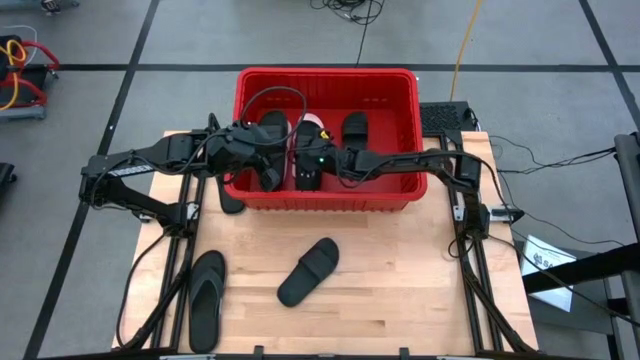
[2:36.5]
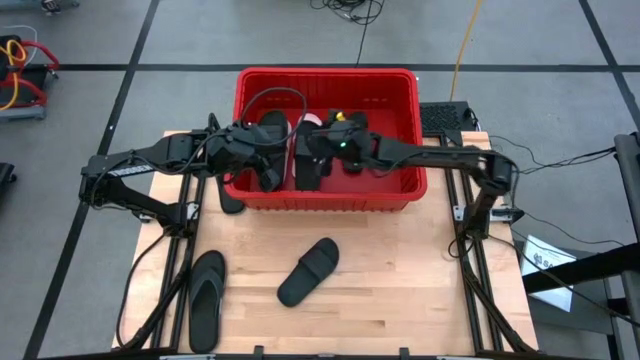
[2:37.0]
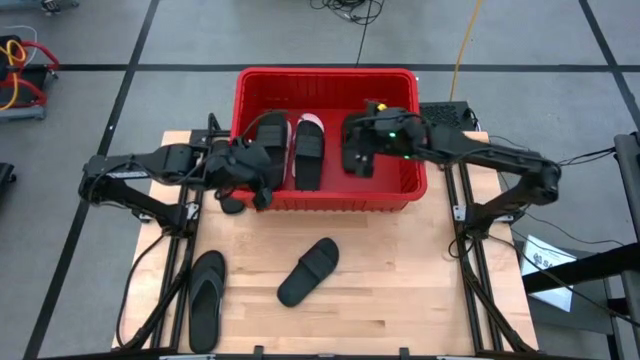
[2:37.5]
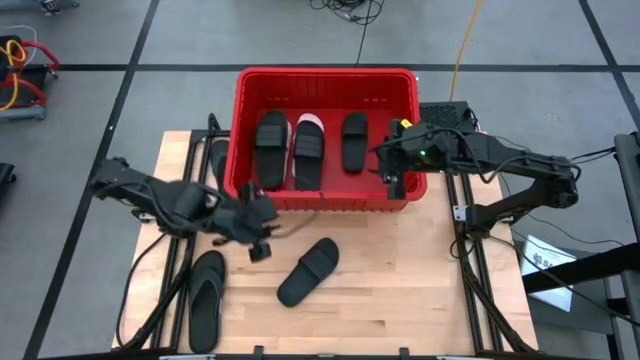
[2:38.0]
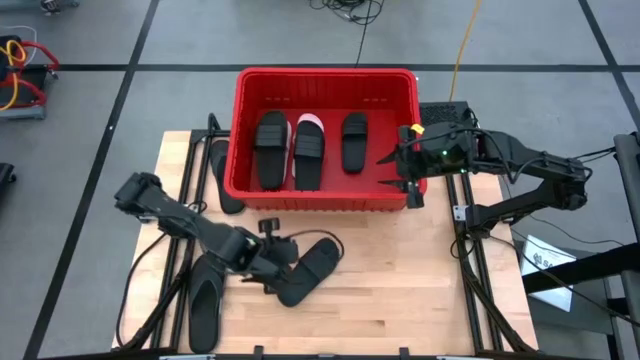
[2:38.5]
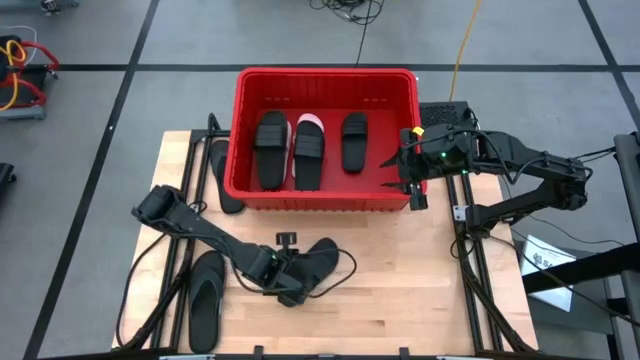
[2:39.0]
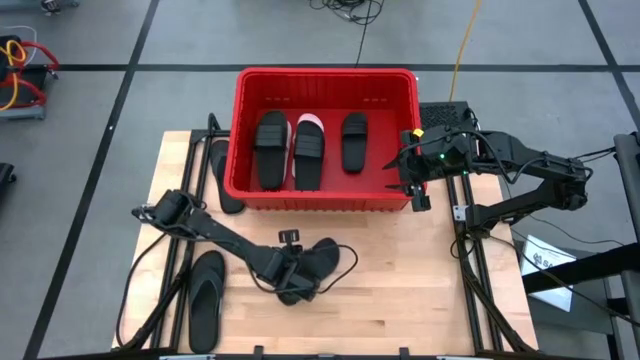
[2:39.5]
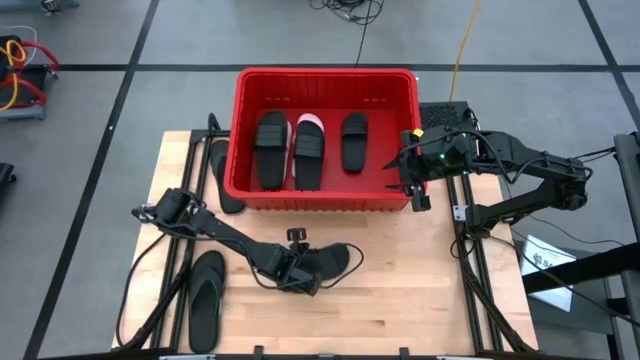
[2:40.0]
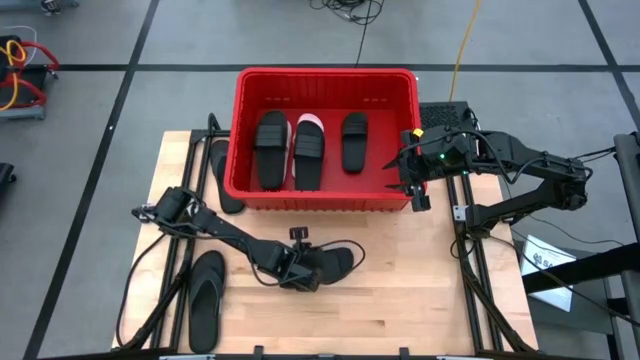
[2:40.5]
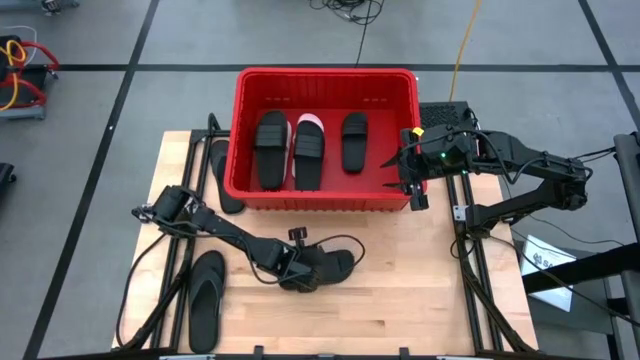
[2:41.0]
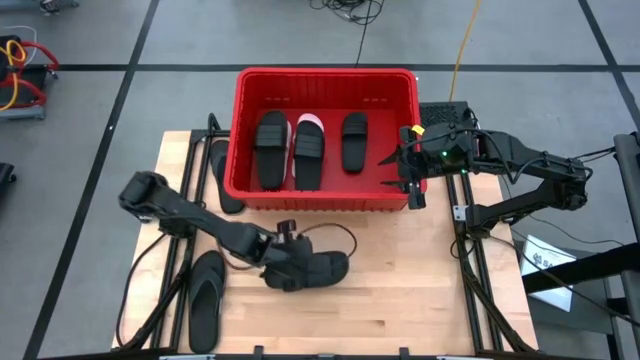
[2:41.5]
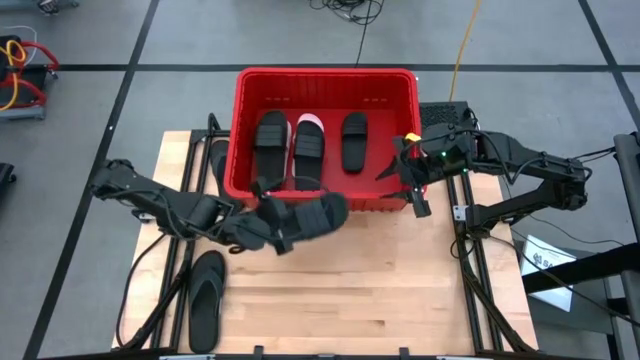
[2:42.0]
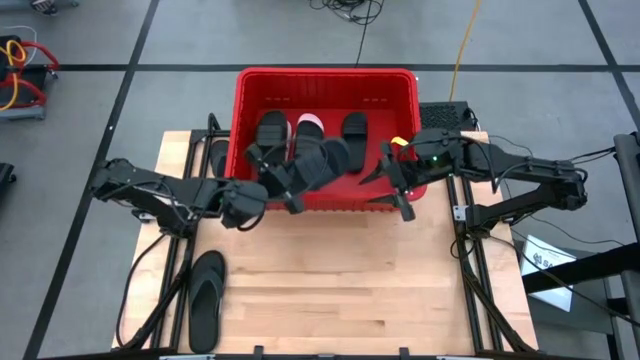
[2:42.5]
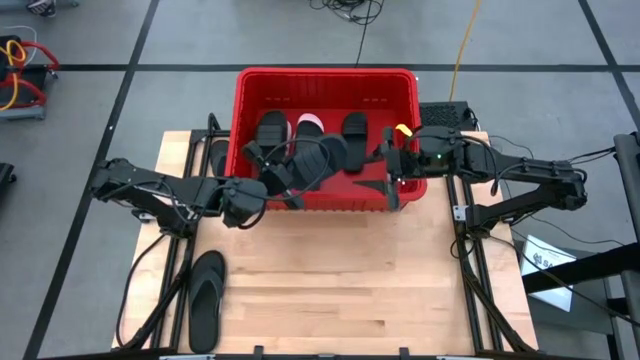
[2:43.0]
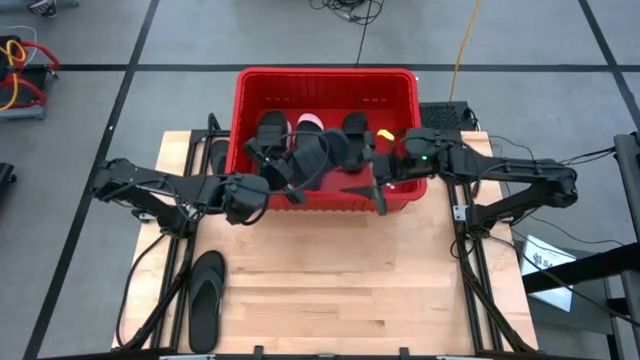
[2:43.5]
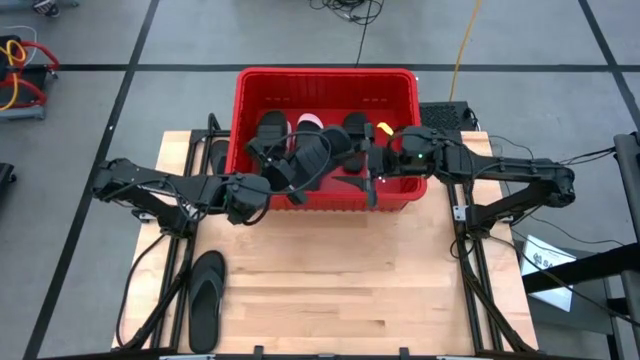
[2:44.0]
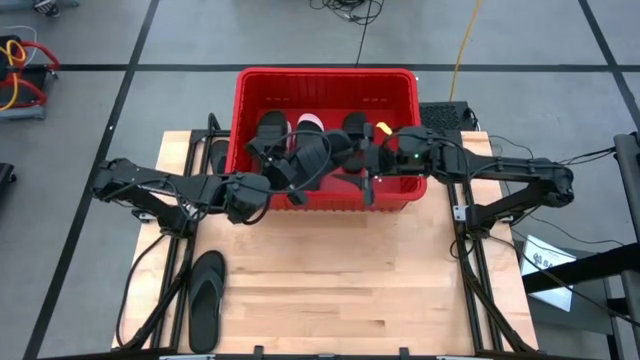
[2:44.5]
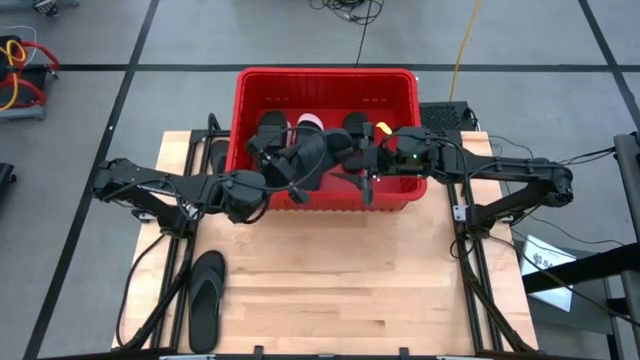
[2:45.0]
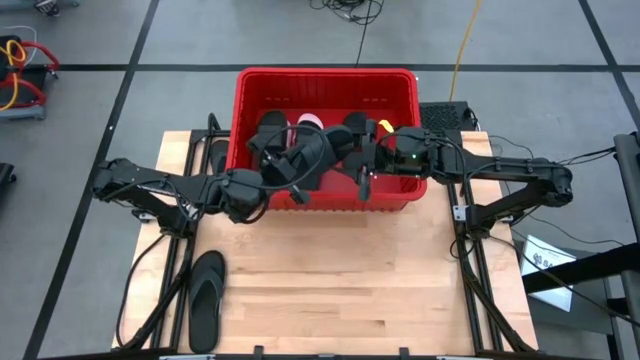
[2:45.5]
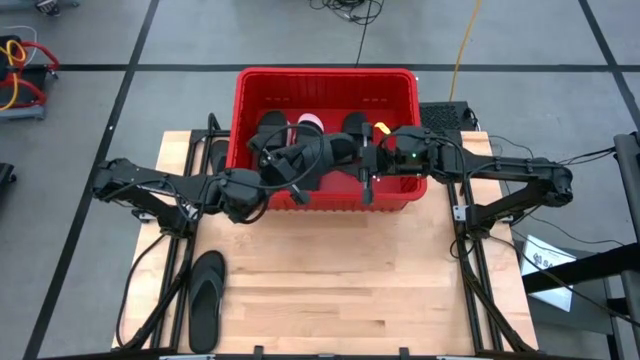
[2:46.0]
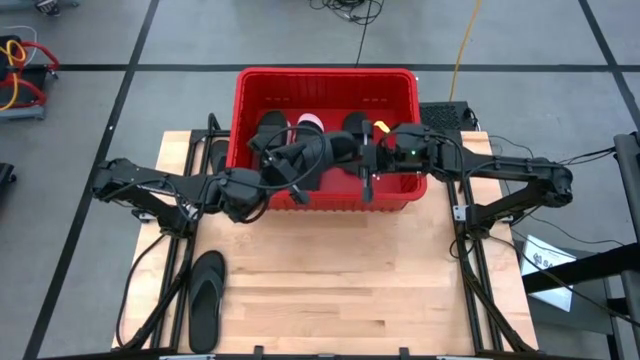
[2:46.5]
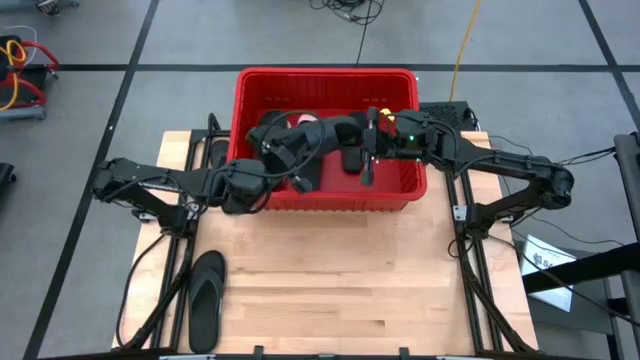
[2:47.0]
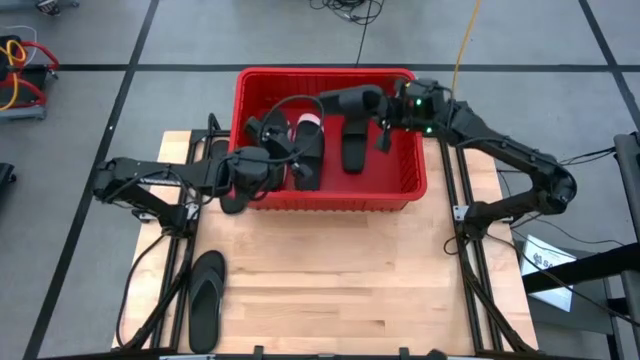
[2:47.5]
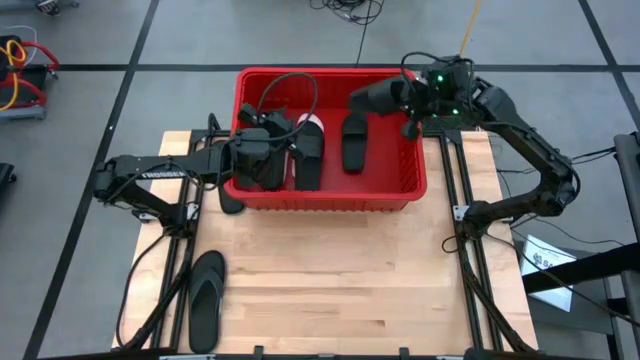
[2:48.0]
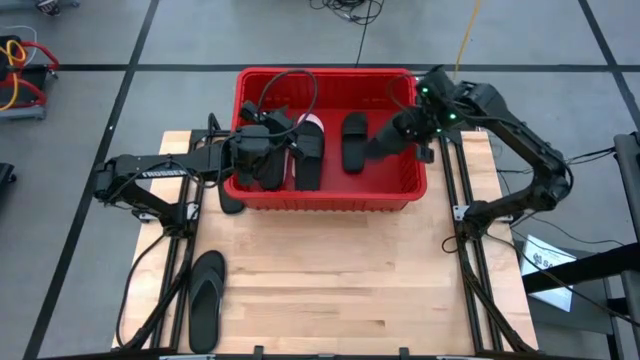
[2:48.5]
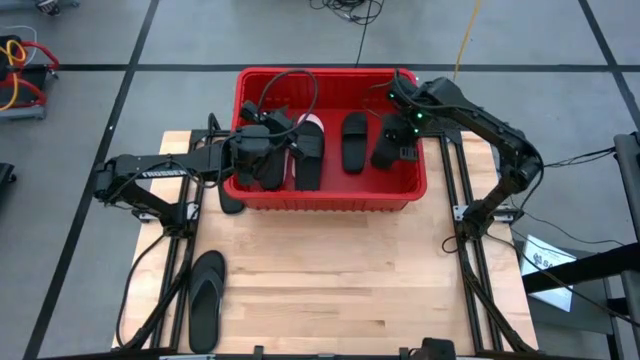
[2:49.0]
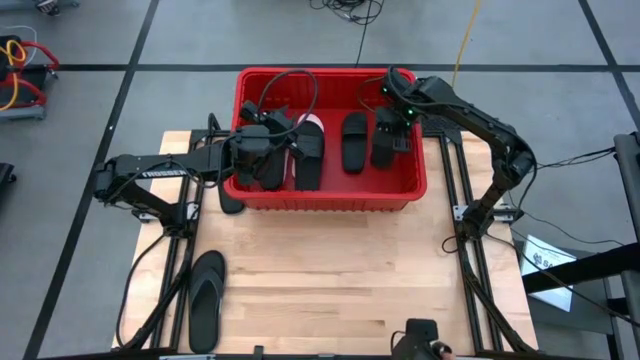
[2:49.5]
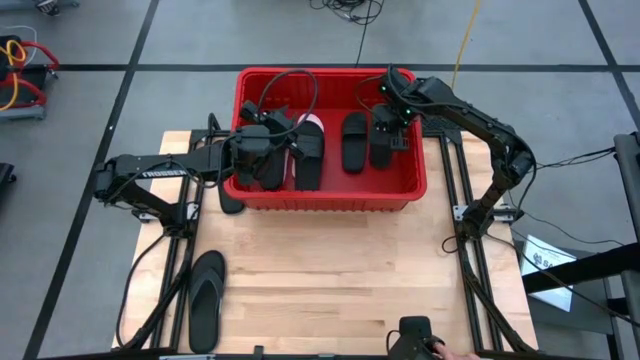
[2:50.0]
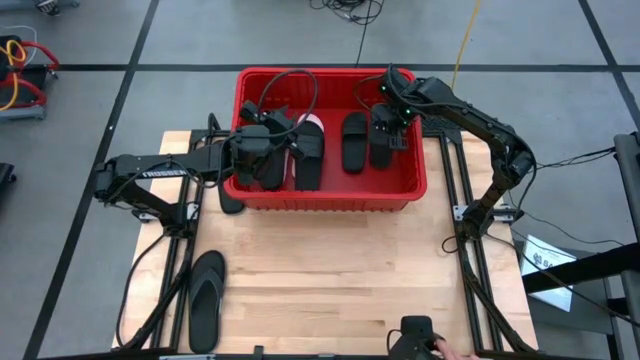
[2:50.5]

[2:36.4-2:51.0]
Task: Pick and place slides into bin
Put the black slide into the red bin

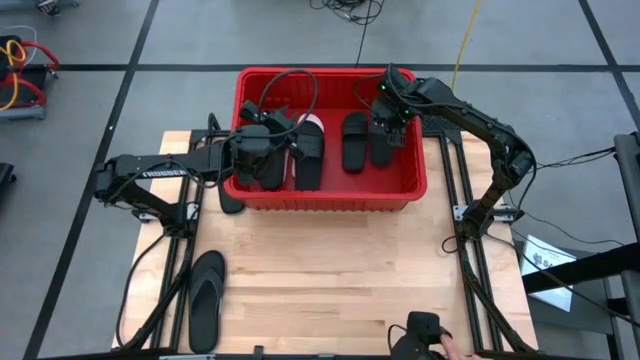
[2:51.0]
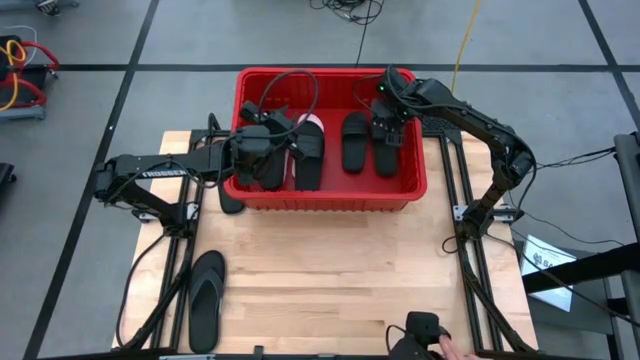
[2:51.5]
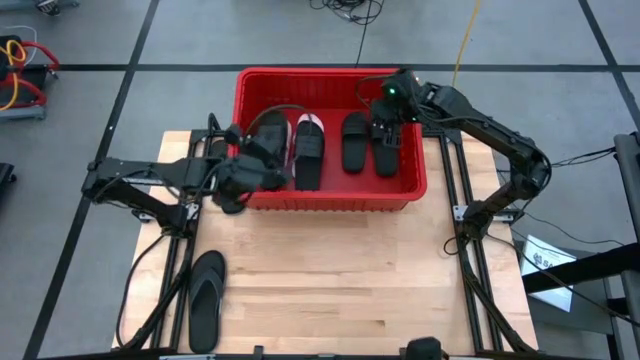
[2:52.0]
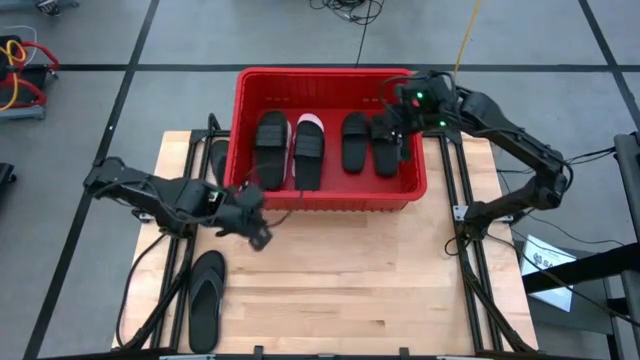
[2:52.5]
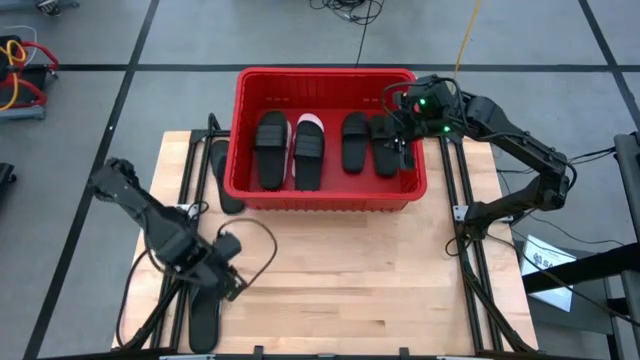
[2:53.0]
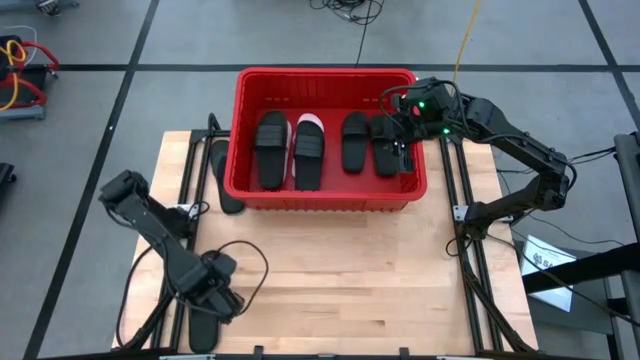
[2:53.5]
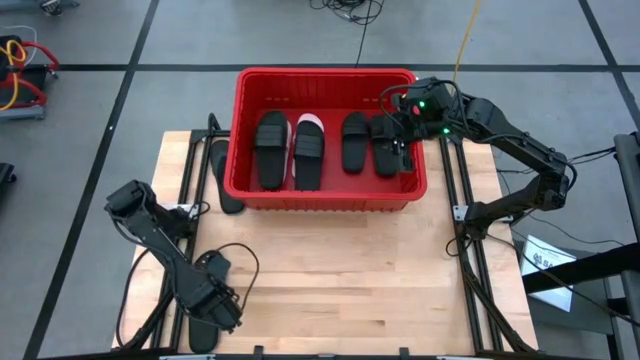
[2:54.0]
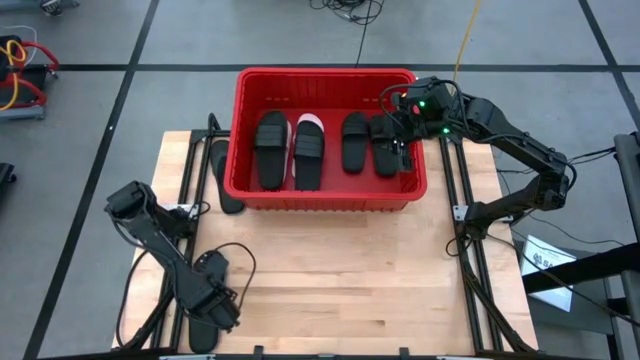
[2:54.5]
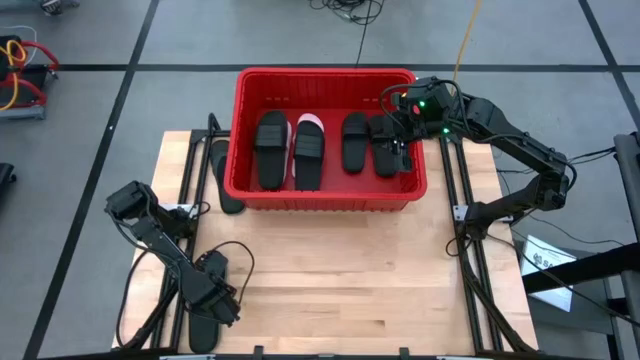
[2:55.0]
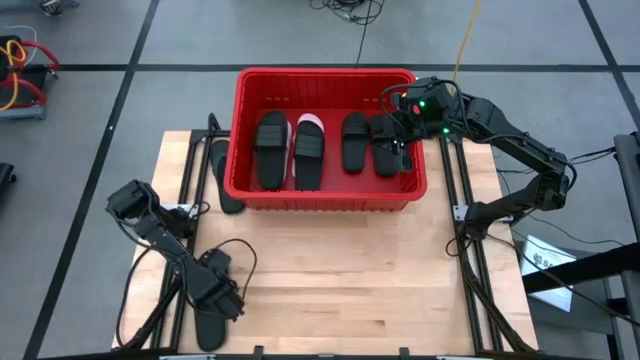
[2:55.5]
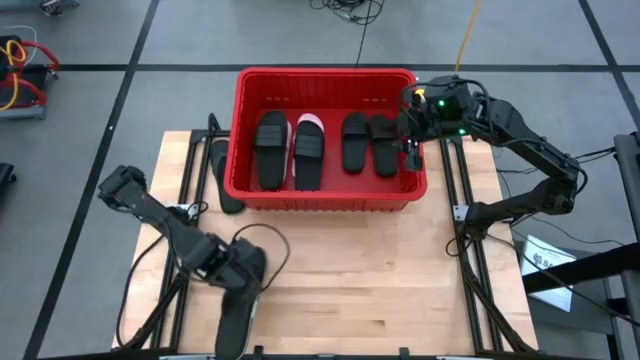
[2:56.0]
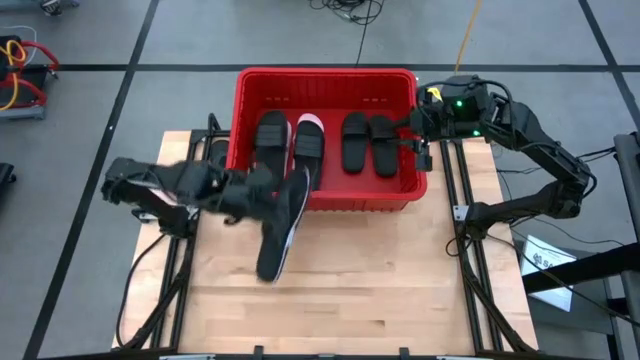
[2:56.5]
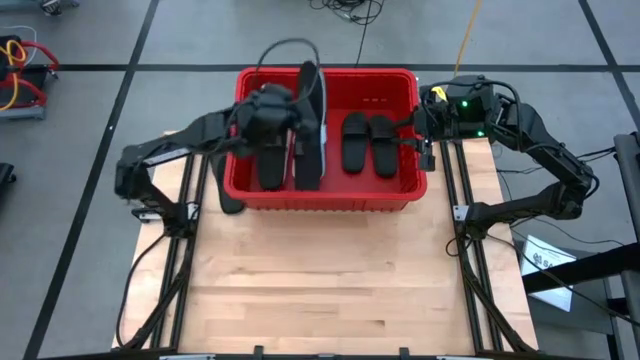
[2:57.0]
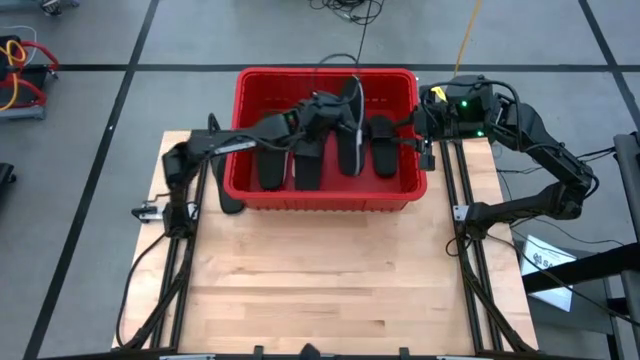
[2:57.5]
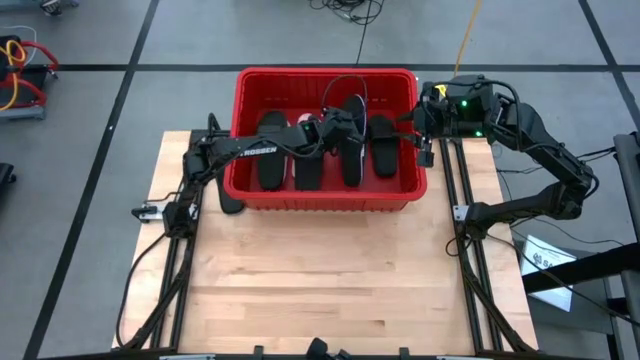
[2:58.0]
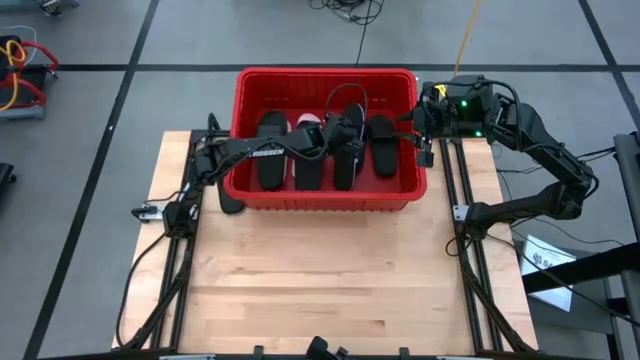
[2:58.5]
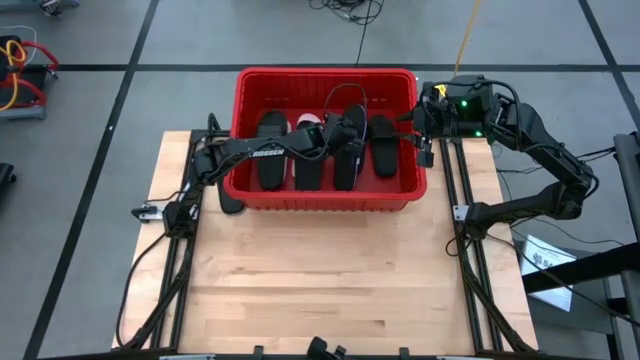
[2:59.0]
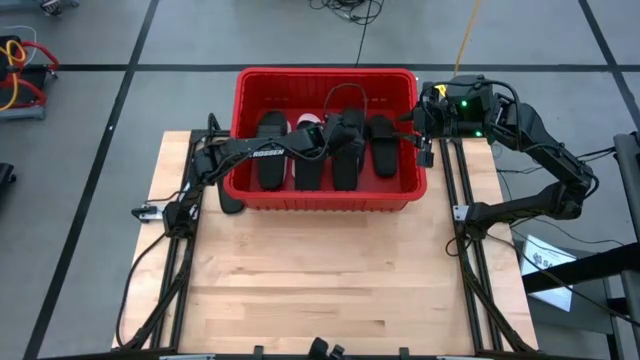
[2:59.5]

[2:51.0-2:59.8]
Put the bottom black flip flop on top of the slide in the red bin
